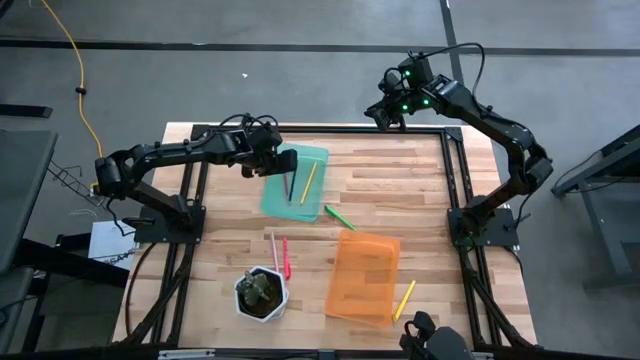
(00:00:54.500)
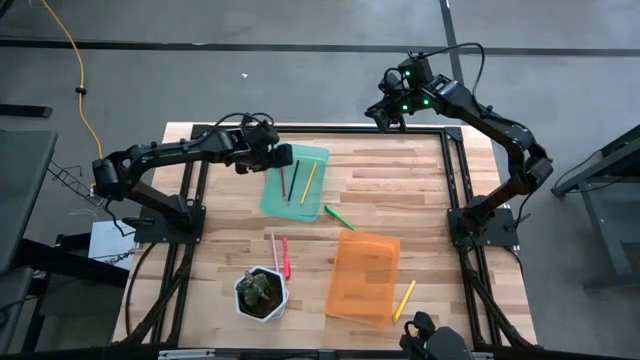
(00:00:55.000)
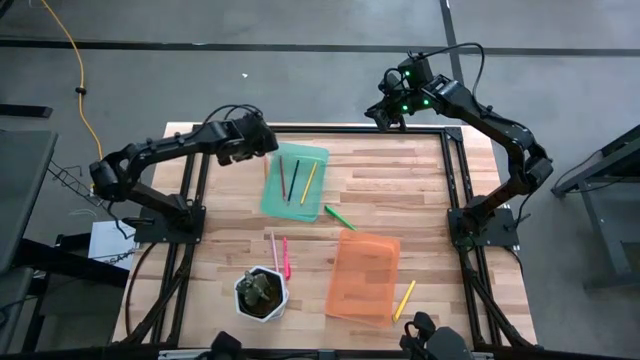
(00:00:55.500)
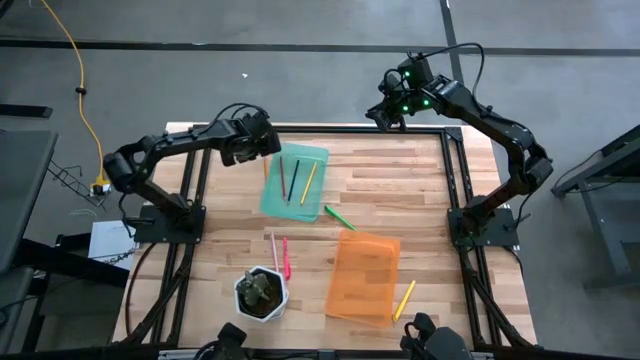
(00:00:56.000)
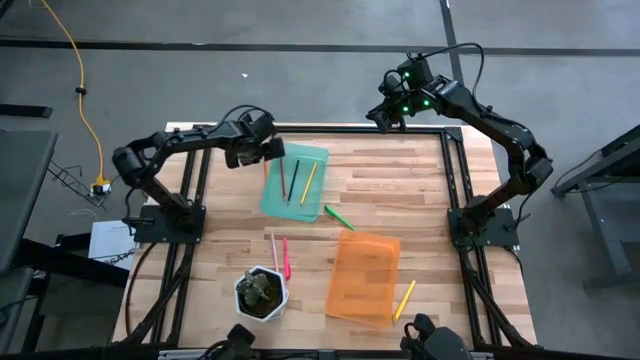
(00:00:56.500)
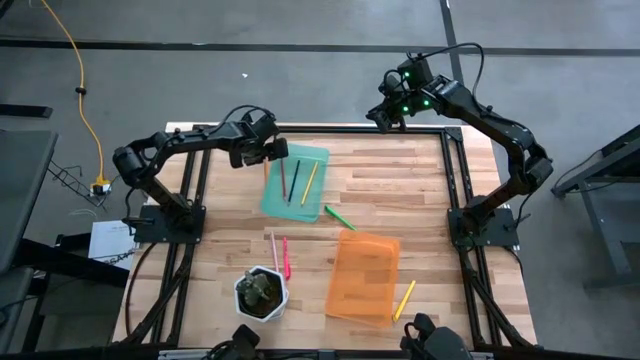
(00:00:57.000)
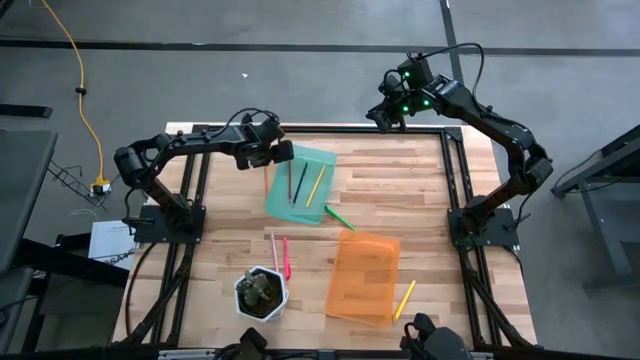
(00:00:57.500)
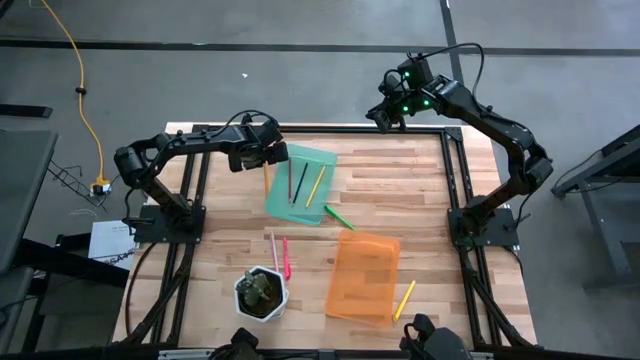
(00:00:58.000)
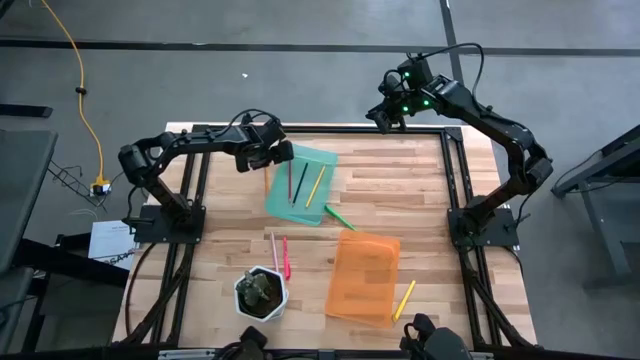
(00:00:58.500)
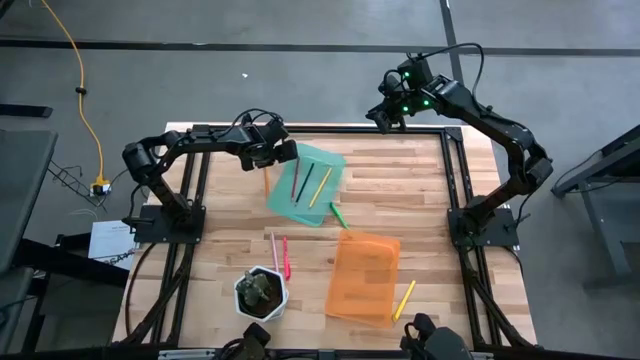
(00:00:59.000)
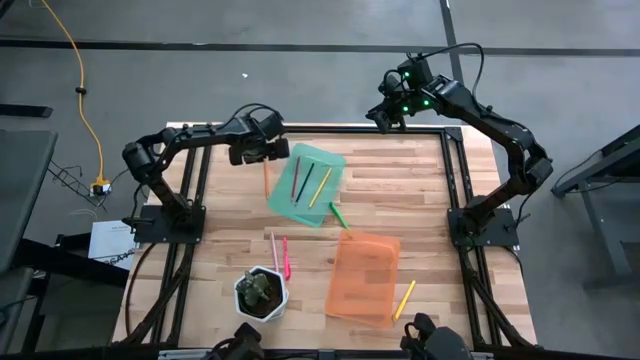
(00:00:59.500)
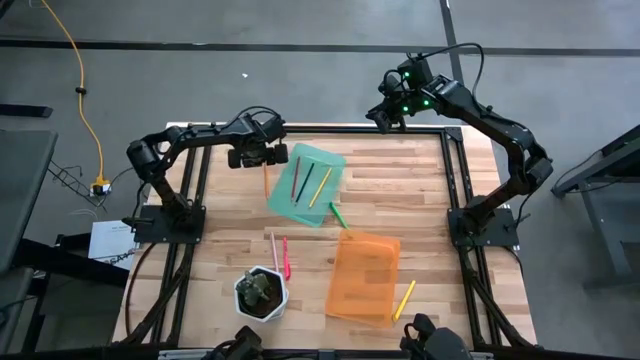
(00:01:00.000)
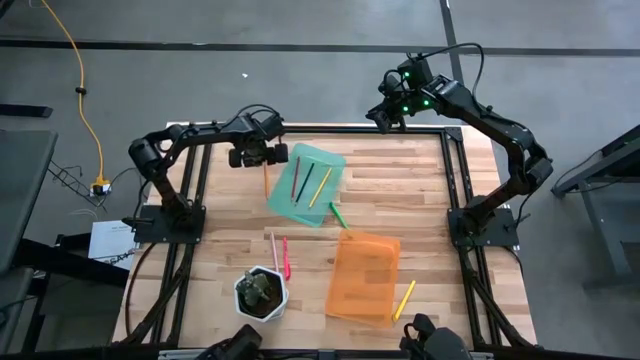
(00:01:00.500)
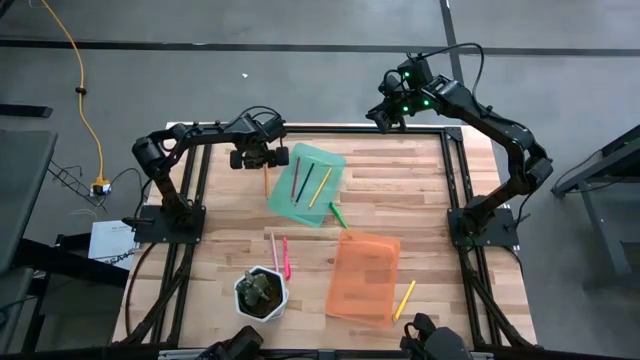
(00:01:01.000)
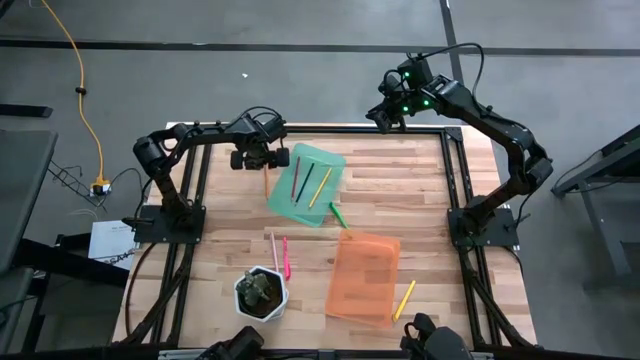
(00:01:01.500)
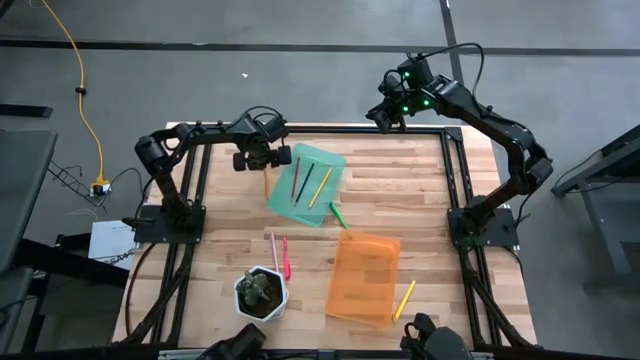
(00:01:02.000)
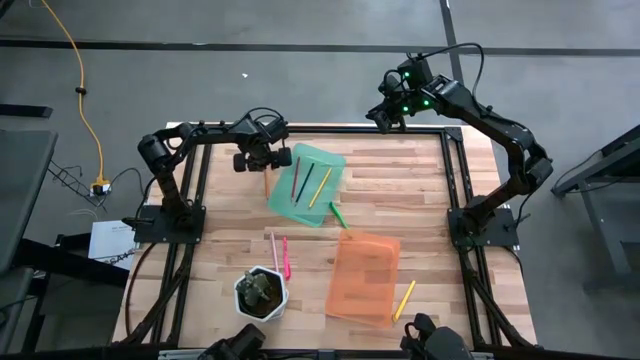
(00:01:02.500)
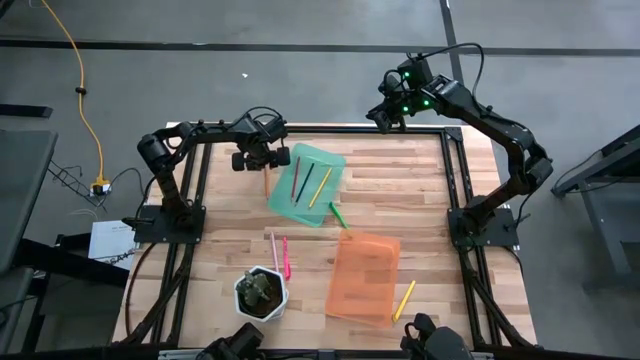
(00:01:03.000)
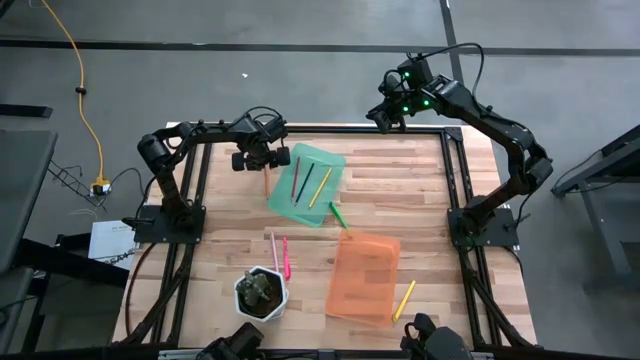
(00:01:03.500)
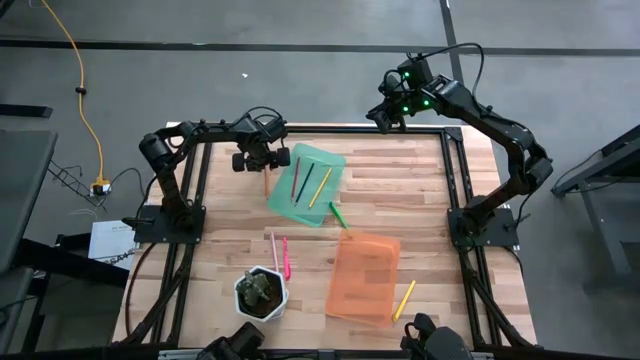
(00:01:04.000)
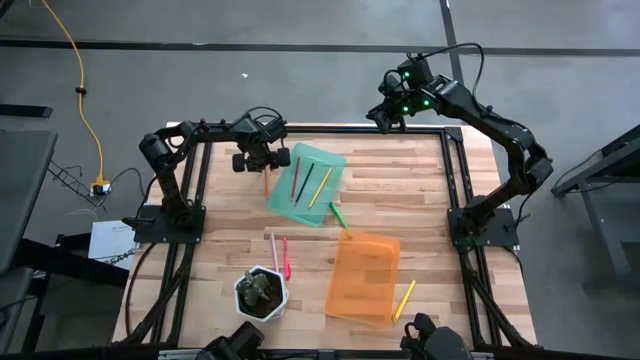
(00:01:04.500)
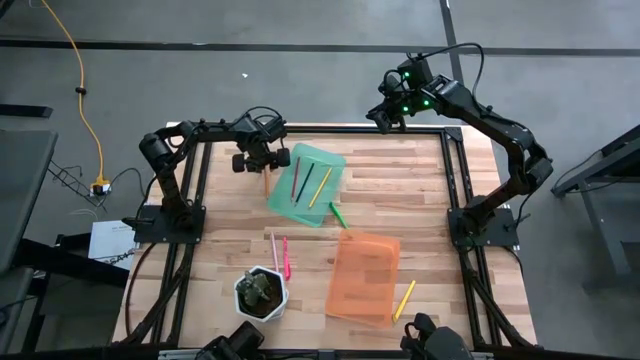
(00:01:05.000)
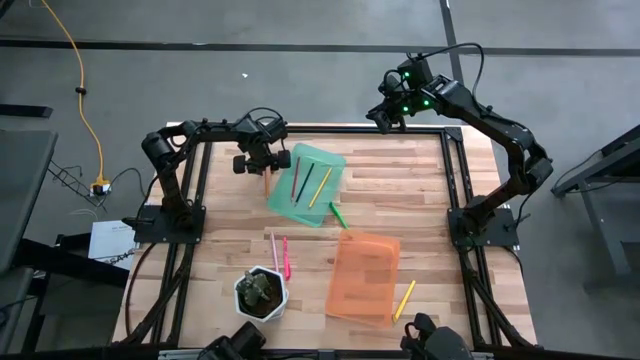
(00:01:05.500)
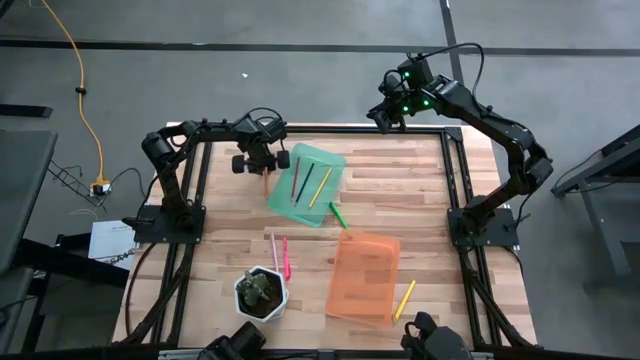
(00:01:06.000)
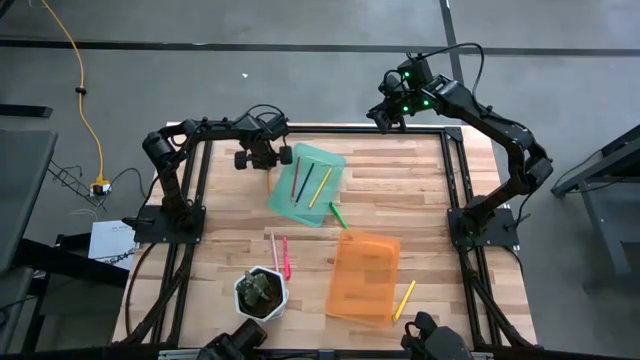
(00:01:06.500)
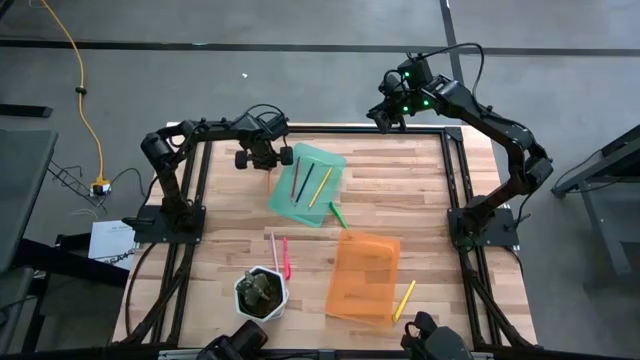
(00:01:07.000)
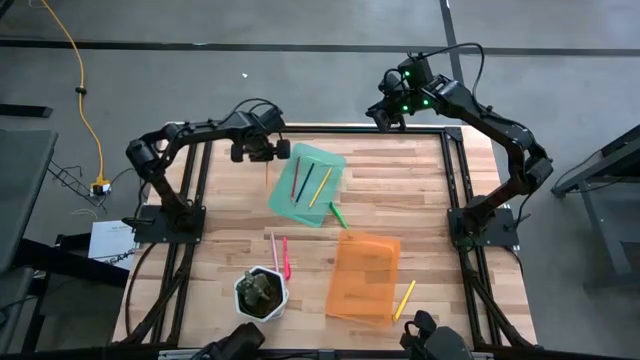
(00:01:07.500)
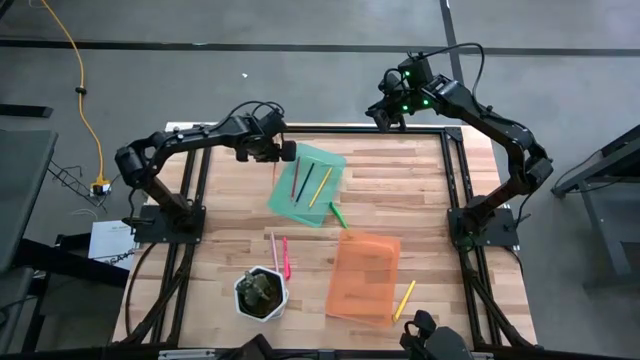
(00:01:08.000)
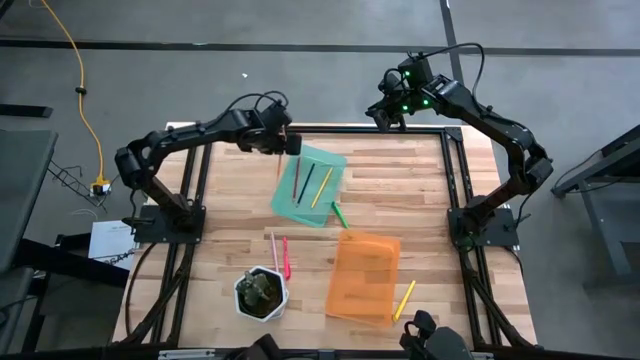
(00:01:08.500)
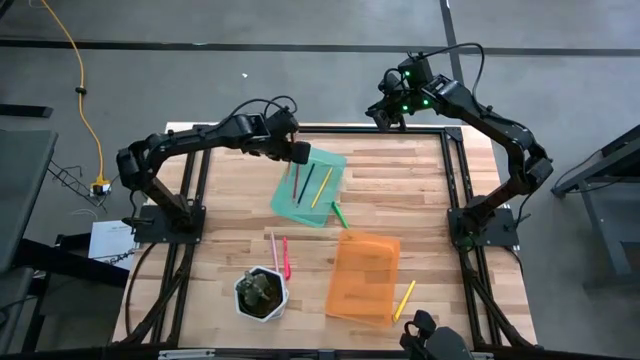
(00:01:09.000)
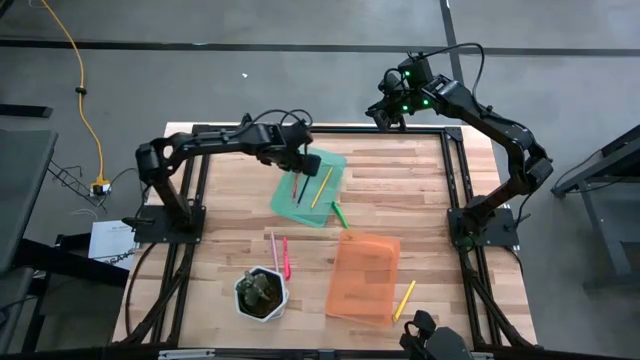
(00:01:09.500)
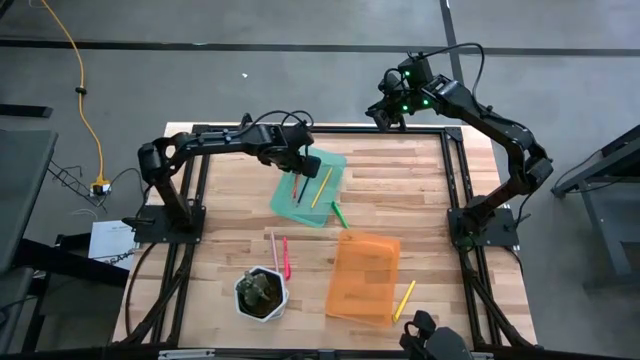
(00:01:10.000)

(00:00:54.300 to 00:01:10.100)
Task: Sort pens & pencils
Put the orange pencil into the green bin
